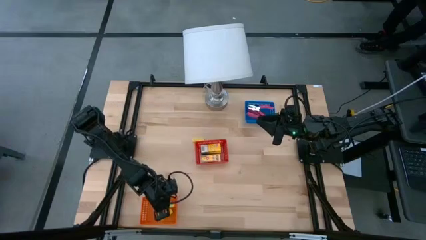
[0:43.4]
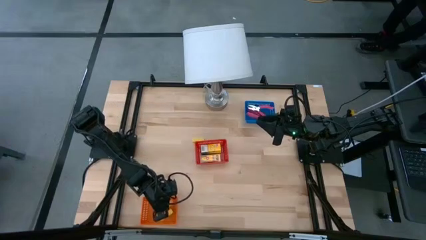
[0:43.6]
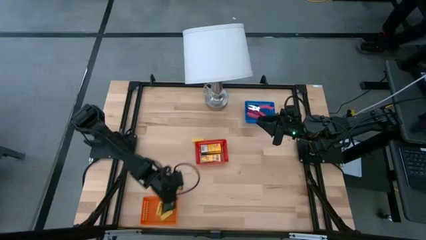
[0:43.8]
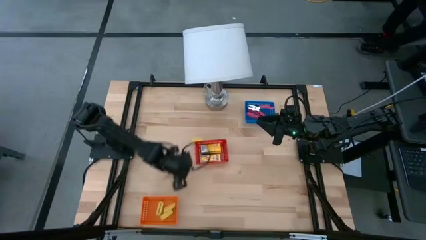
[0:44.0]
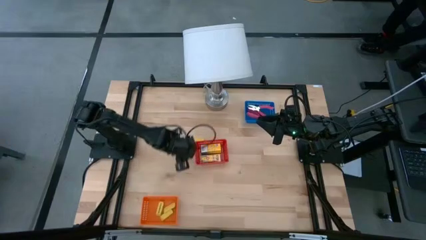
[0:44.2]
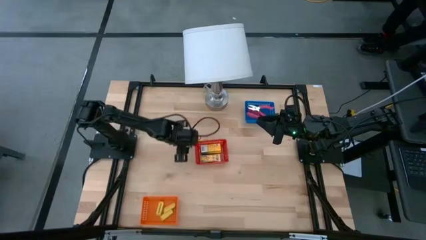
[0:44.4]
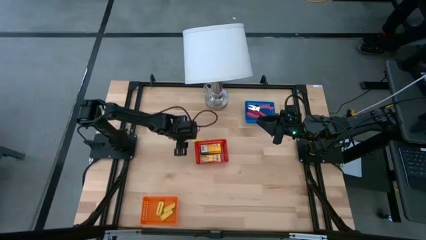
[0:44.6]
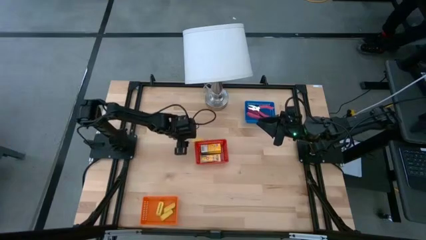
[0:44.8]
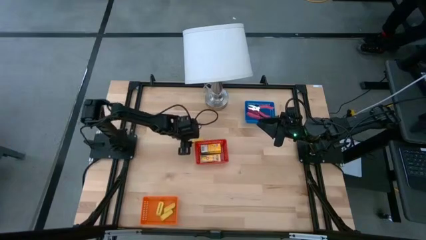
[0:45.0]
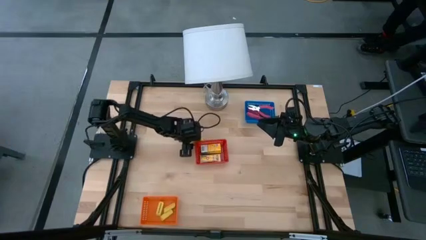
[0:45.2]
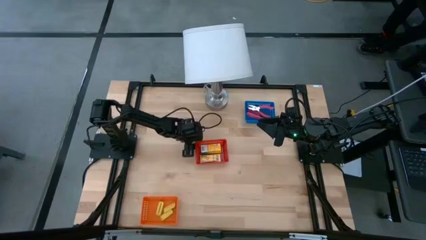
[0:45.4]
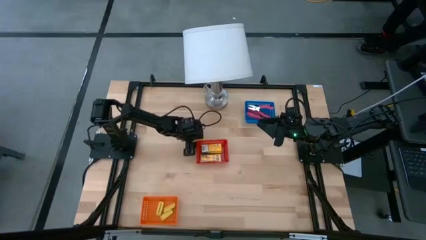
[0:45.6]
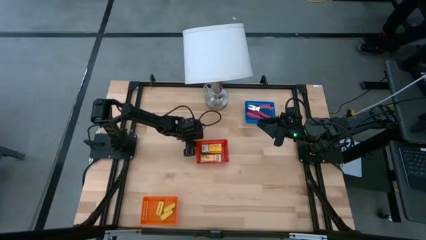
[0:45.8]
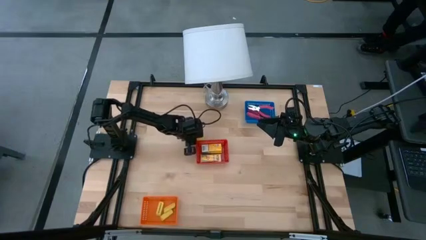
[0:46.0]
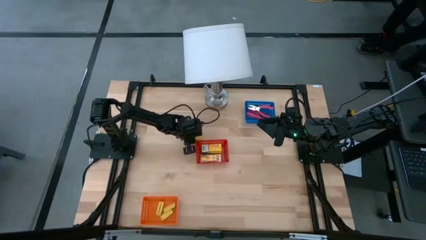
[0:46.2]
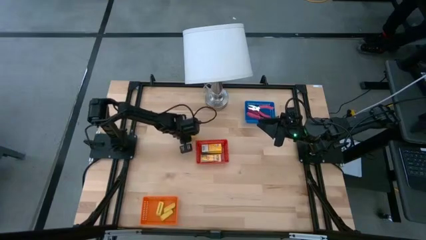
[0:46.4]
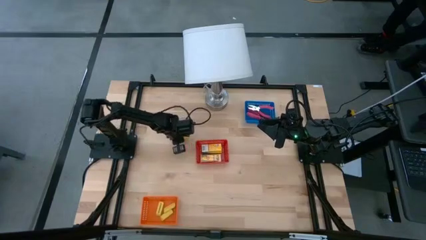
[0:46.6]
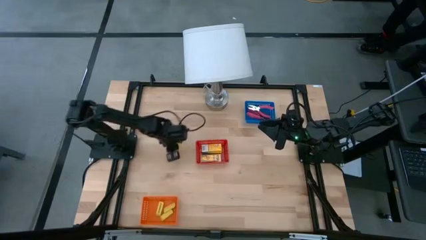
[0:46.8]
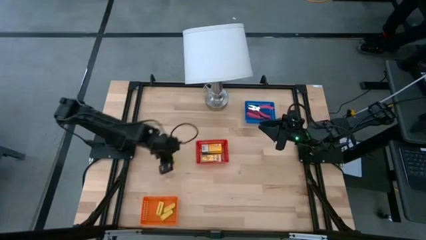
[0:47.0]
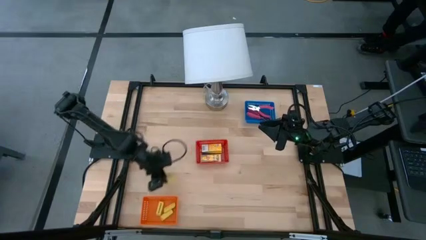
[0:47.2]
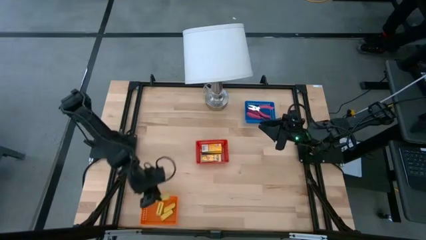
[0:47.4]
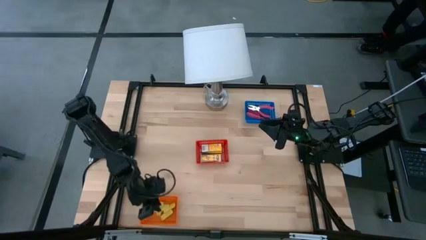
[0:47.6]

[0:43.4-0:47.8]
Task: Pick & Place School Supplies
Put the yellow eraser into the orange bin

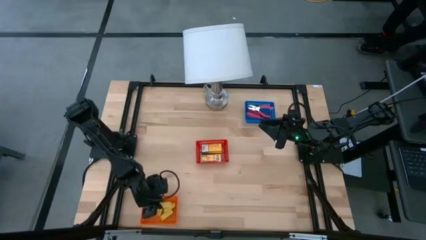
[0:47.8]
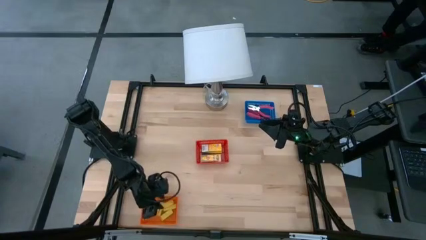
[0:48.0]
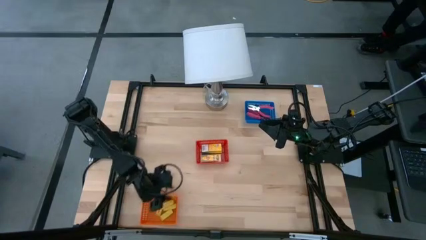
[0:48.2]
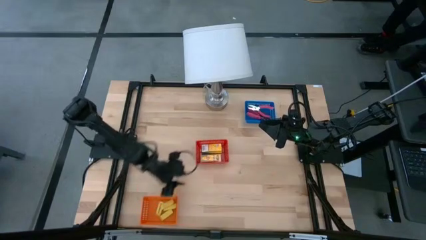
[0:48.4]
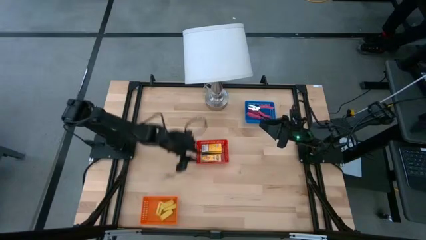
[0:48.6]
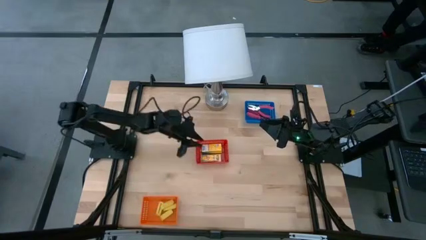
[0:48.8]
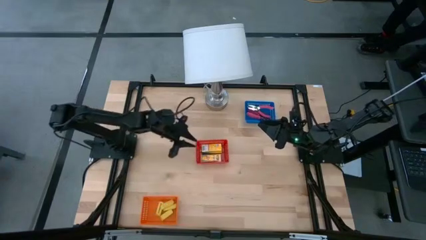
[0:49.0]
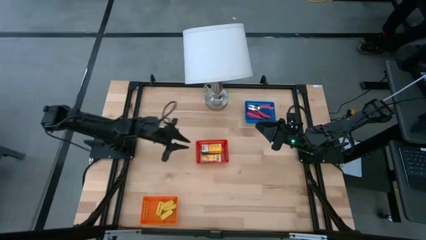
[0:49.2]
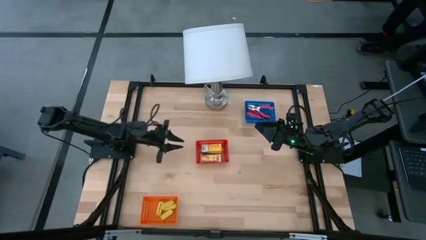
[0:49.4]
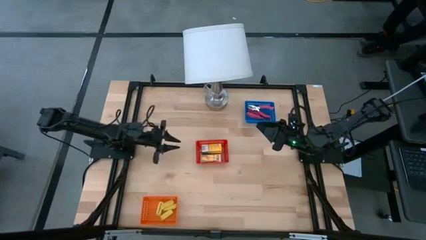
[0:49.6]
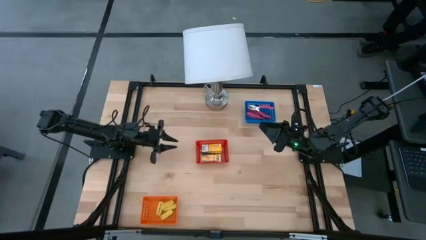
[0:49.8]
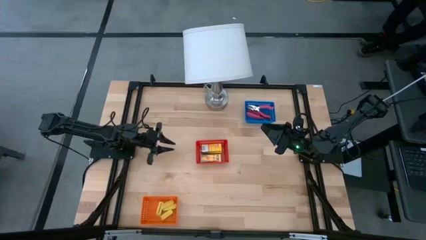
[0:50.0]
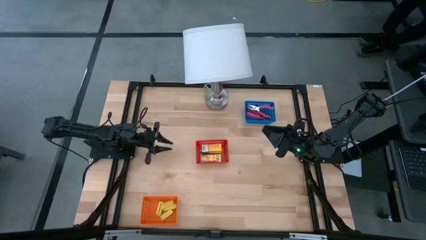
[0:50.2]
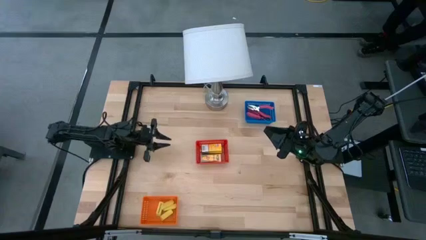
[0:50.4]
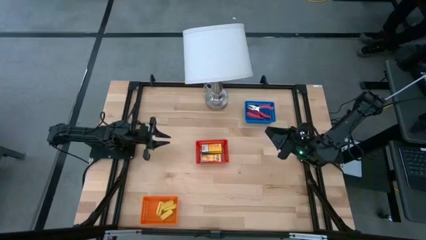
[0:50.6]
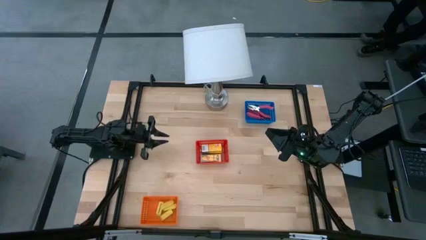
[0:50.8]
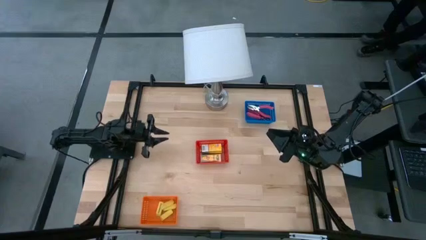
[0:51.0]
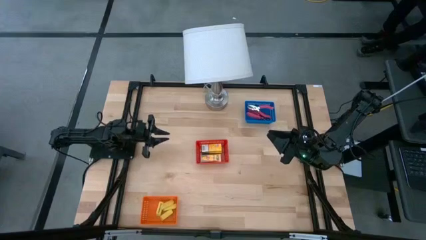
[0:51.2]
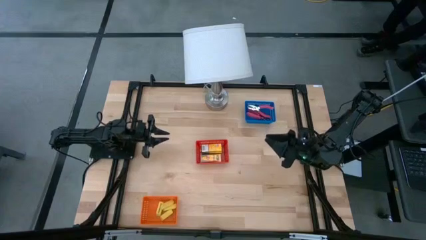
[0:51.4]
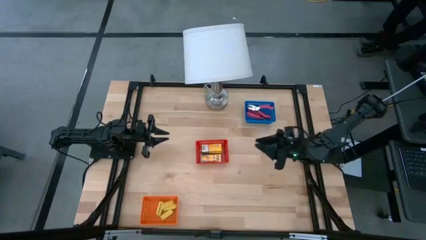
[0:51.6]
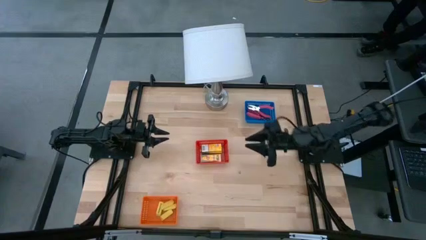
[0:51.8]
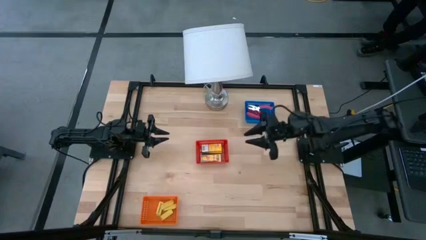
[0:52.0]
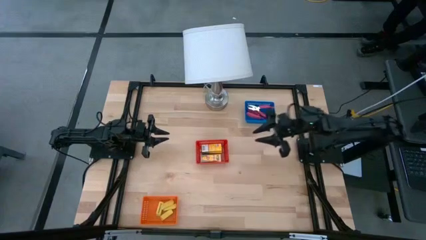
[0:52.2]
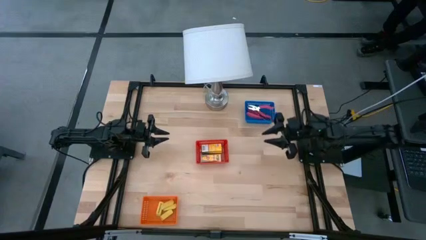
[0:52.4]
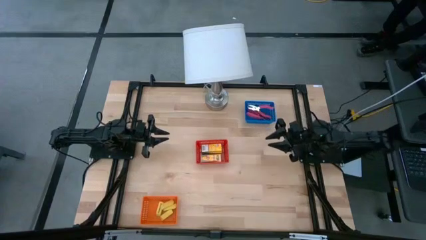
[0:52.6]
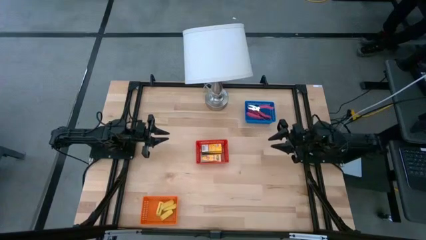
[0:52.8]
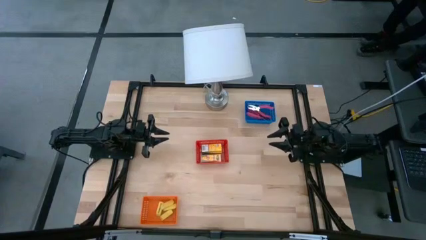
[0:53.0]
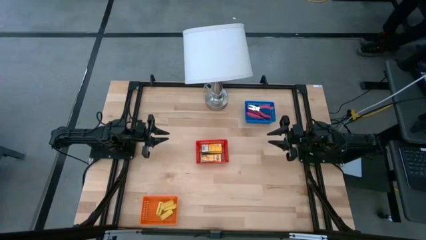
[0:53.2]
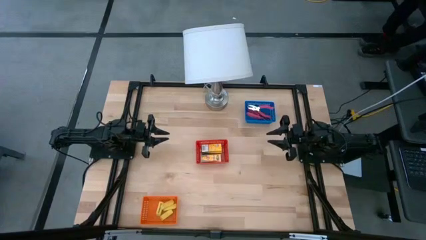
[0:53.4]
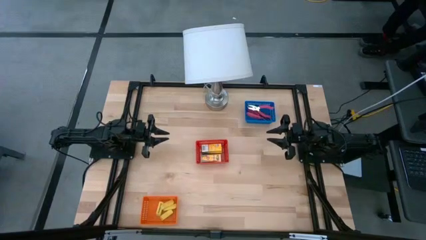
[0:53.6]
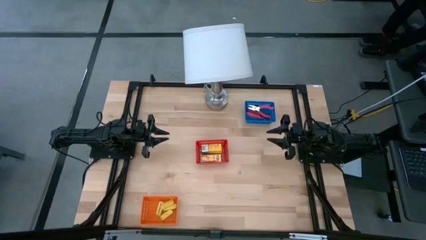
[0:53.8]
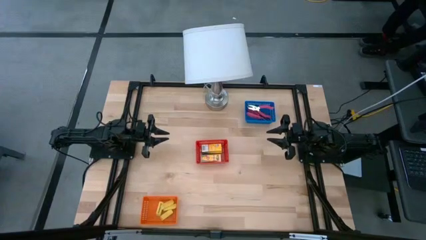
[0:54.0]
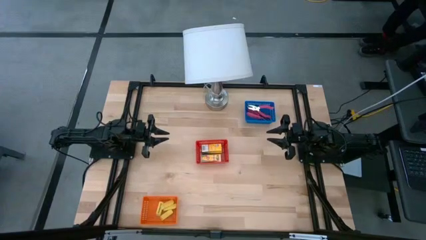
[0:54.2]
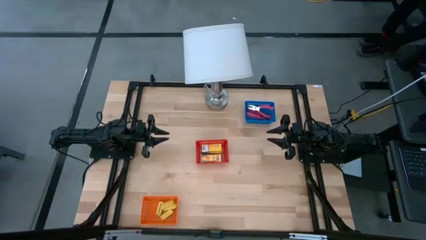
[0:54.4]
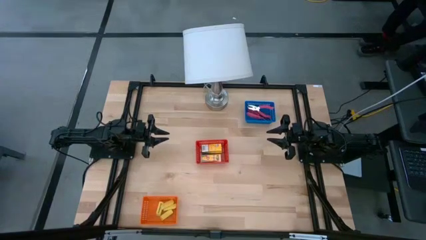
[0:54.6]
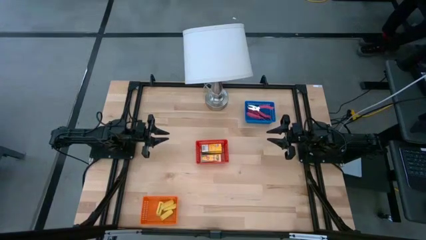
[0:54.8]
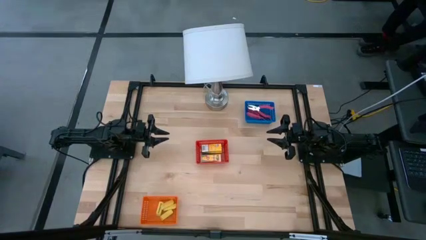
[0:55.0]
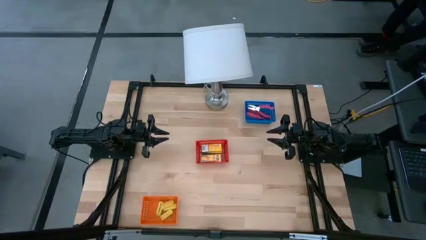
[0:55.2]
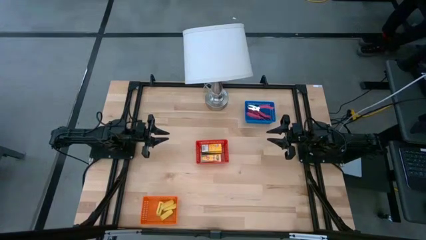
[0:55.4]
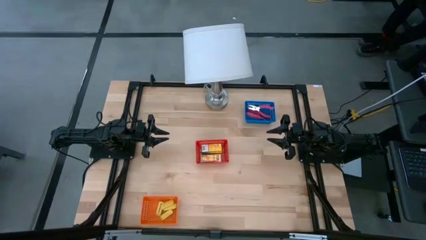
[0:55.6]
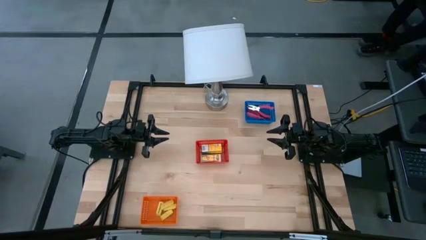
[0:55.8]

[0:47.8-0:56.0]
Return to Home Position

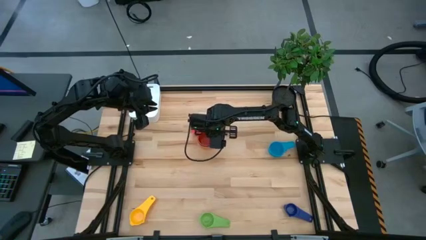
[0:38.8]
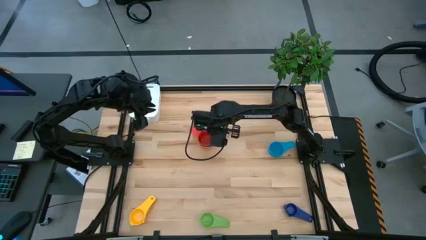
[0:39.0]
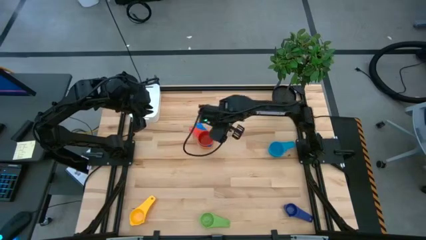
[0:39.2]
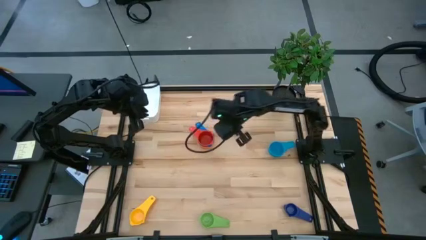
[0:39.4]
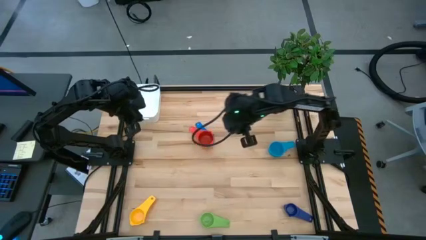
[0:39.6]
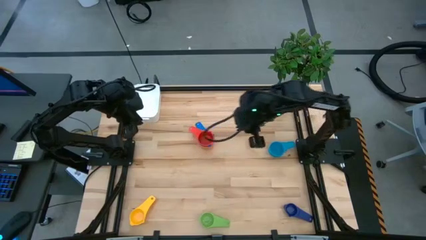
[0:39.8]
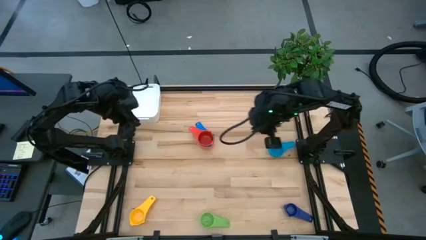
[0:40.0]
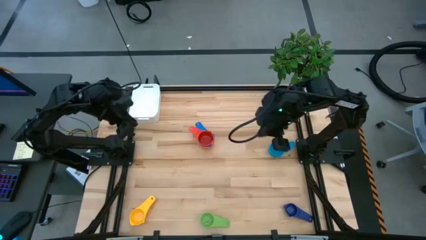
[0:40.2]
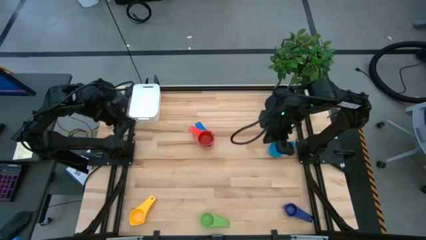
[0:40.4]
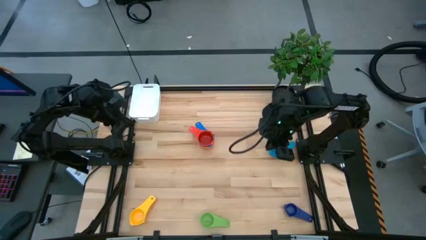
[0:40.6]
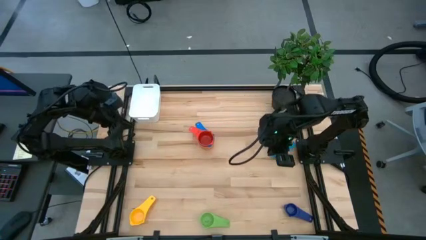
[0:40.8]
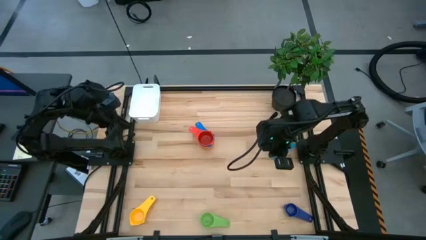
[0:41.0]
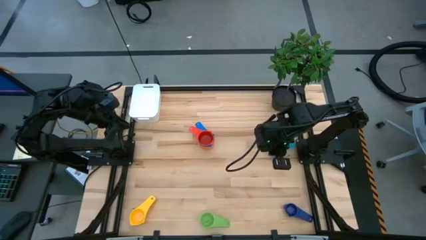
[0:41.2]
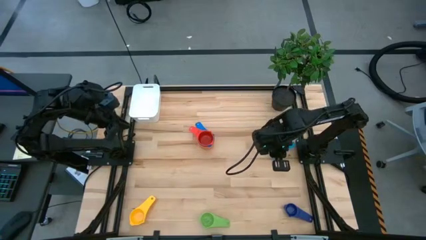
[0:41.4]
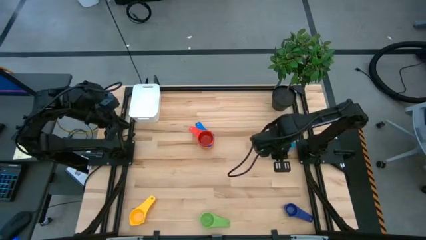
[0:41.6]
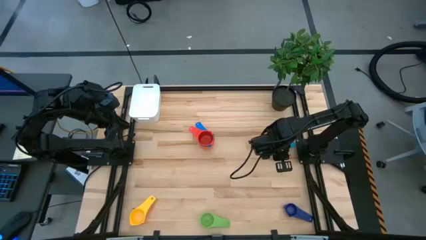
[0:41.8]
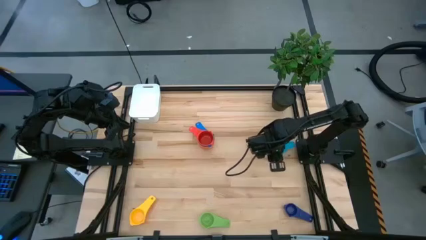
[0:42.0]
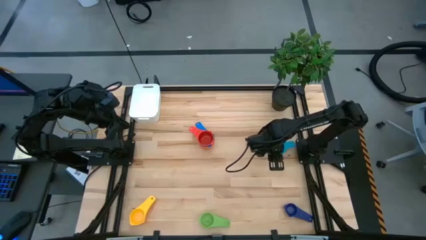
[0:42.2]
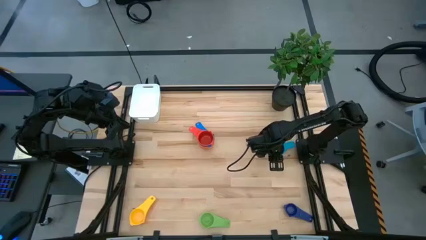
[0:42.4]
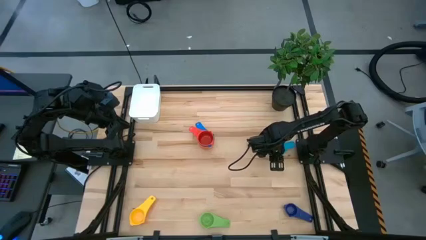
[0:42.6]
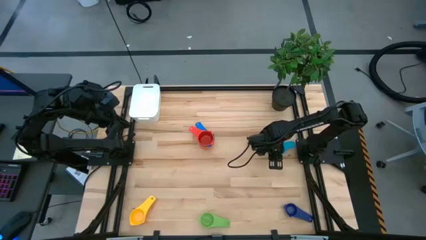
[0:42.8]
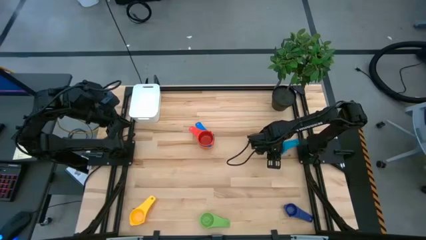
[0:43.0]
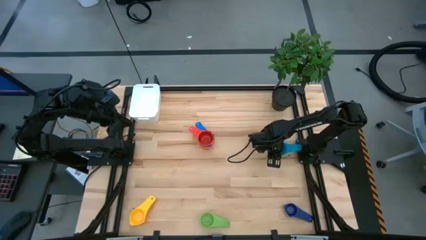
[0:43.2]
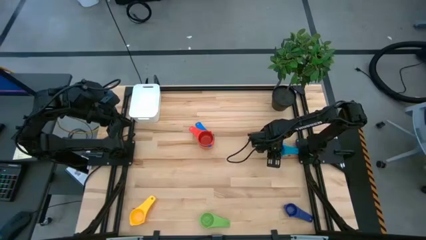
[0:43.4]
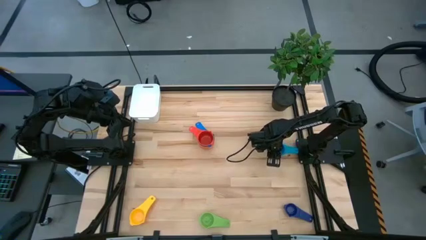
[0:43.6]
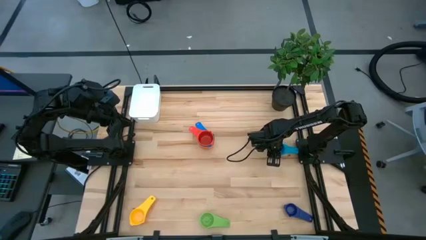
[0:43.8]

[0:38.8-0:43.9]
Task: Nest measuring cups in basket
Stack the light blue measuring cup on top of the red measuring cup
